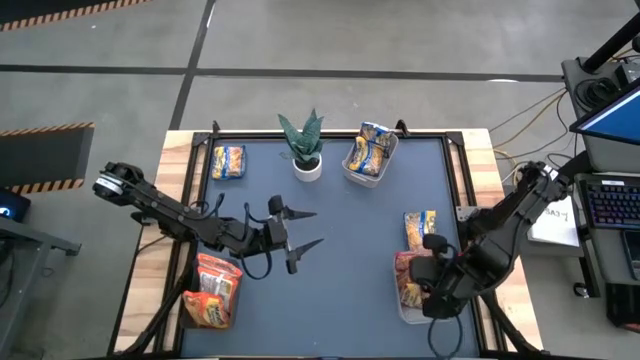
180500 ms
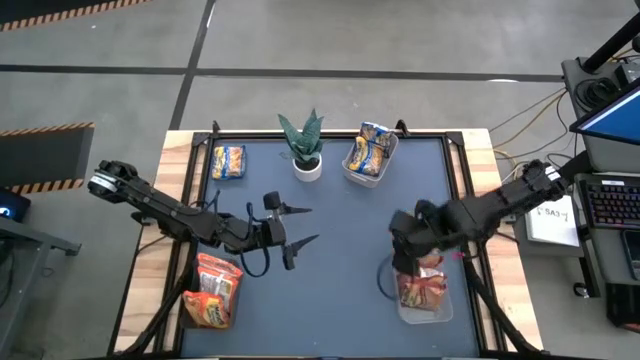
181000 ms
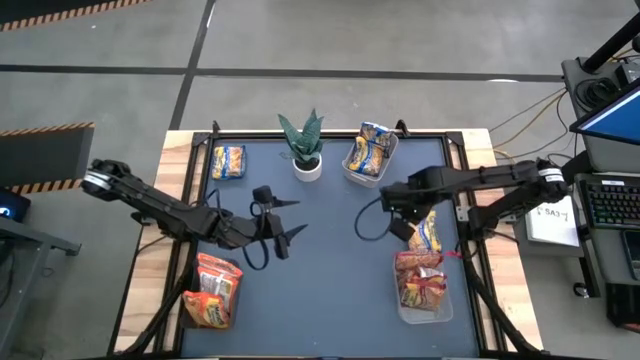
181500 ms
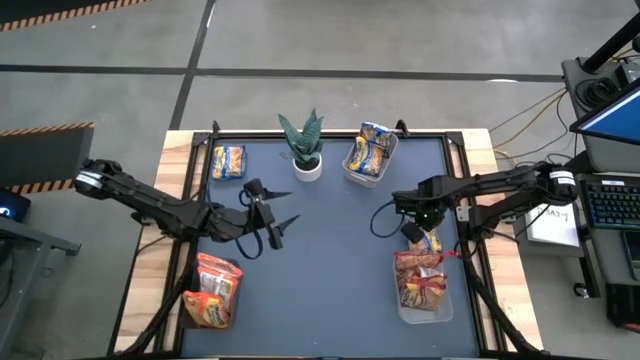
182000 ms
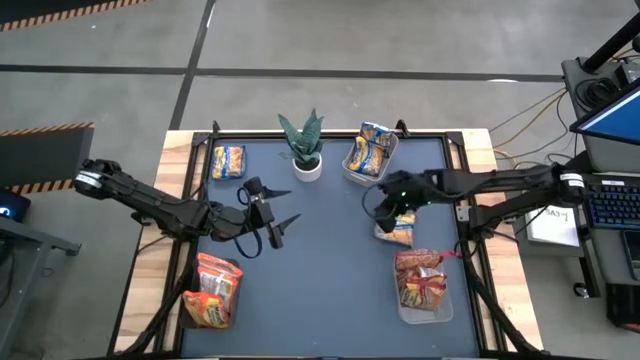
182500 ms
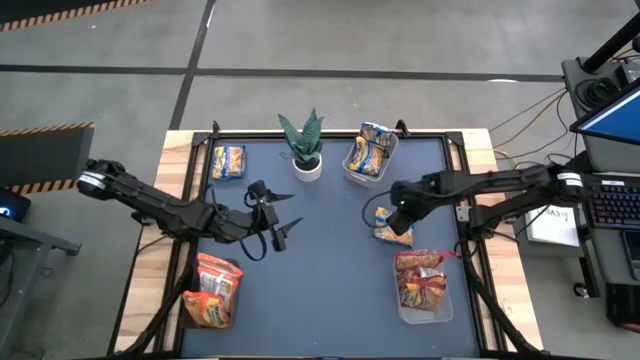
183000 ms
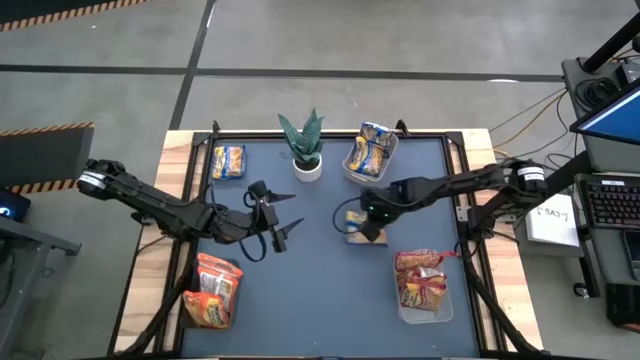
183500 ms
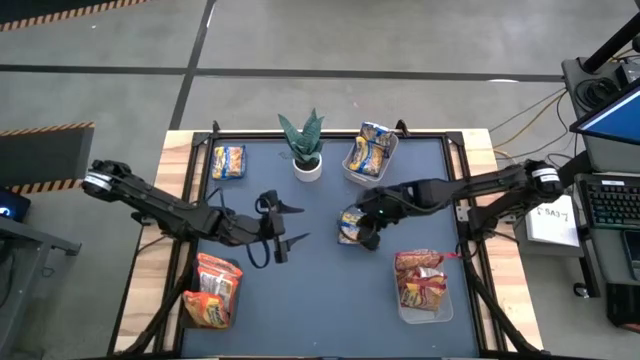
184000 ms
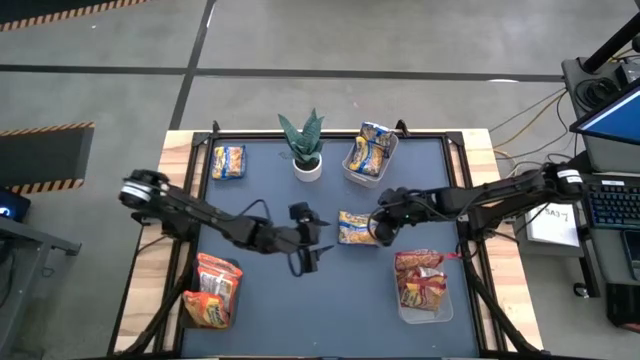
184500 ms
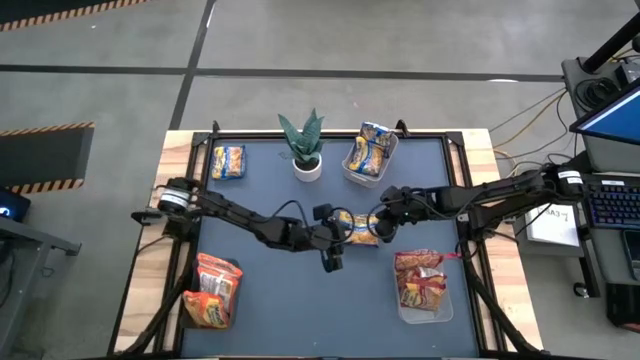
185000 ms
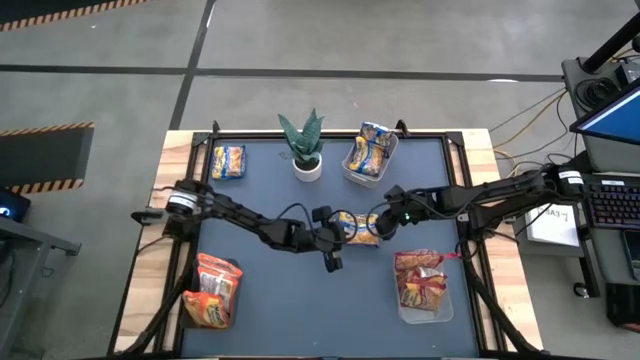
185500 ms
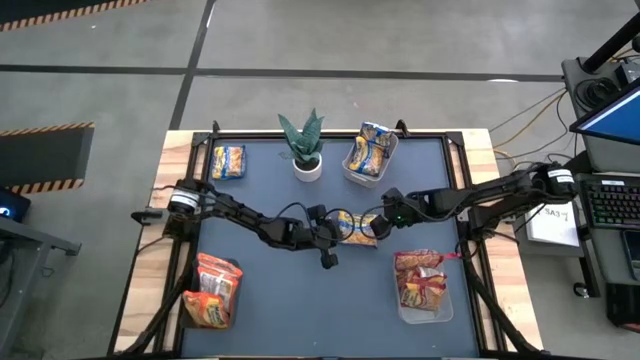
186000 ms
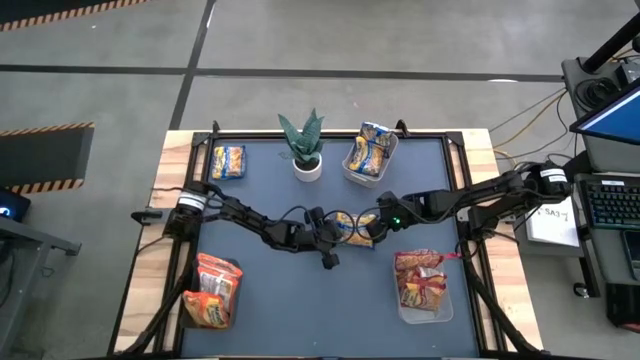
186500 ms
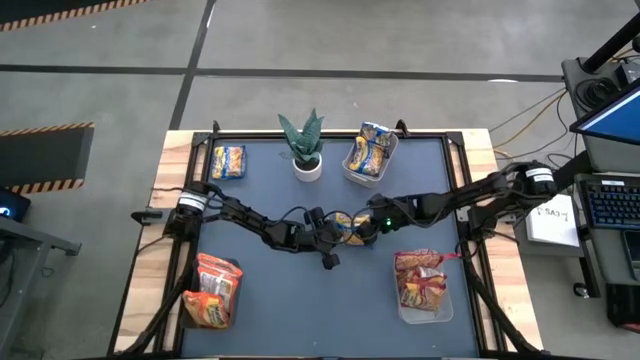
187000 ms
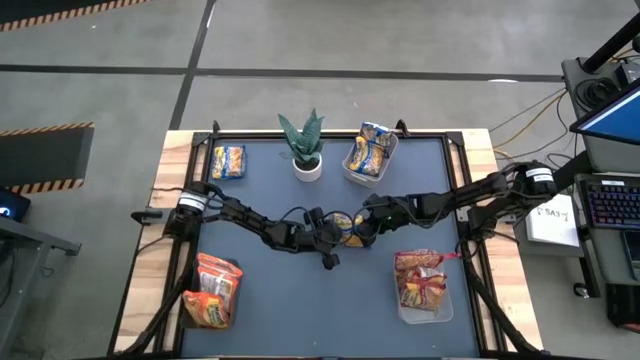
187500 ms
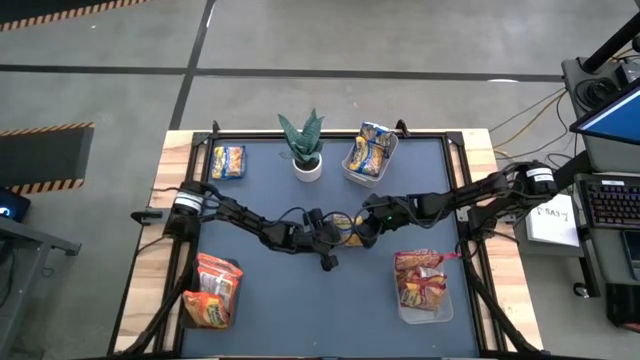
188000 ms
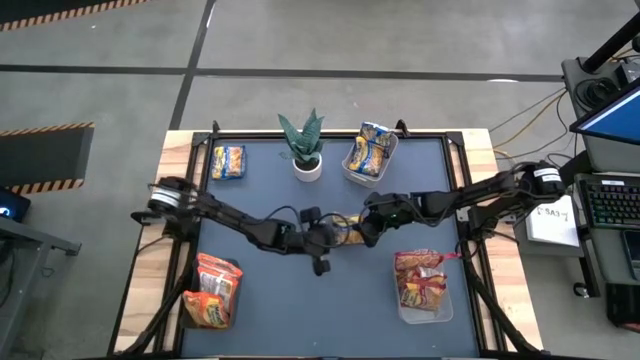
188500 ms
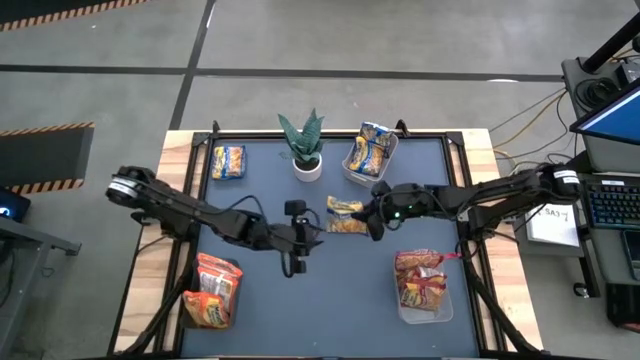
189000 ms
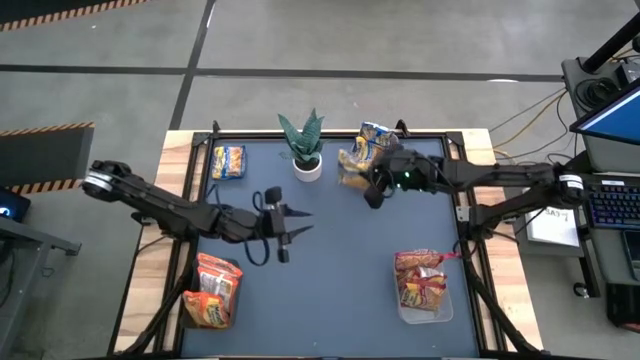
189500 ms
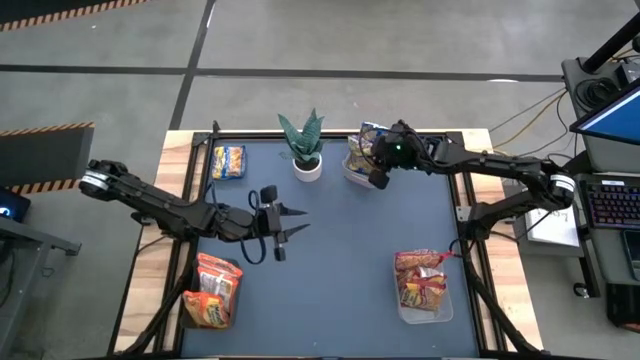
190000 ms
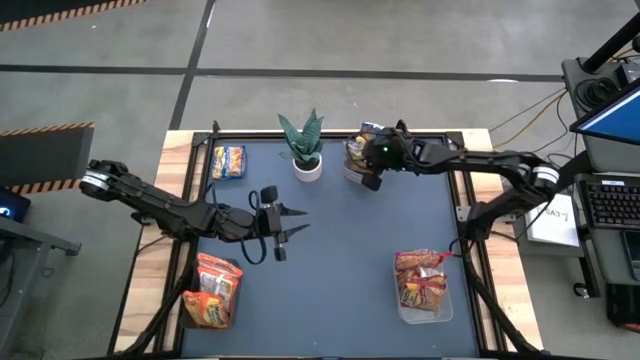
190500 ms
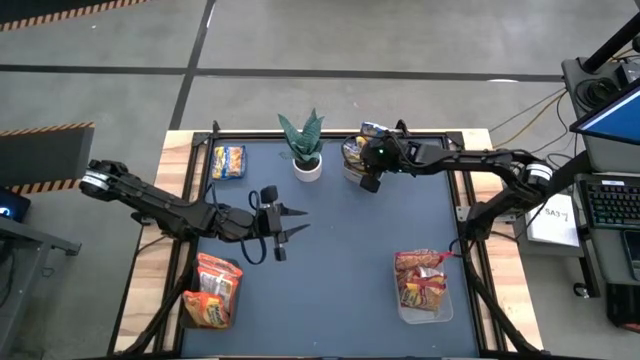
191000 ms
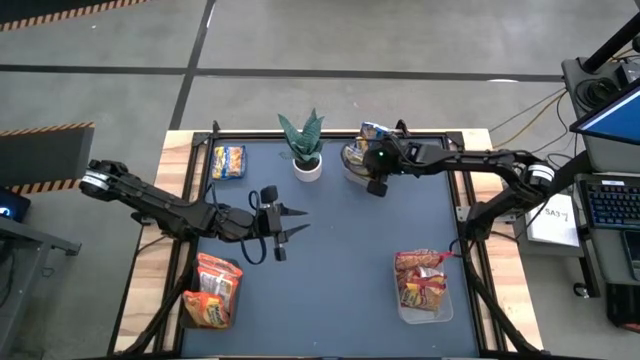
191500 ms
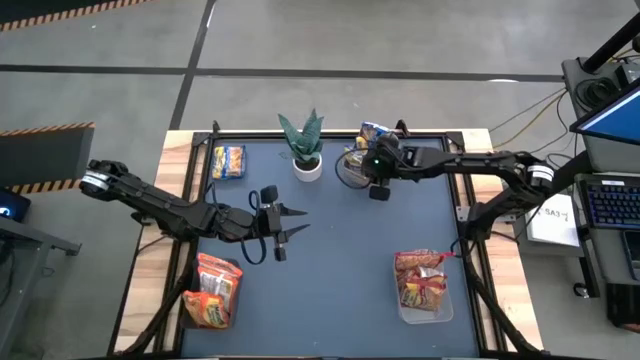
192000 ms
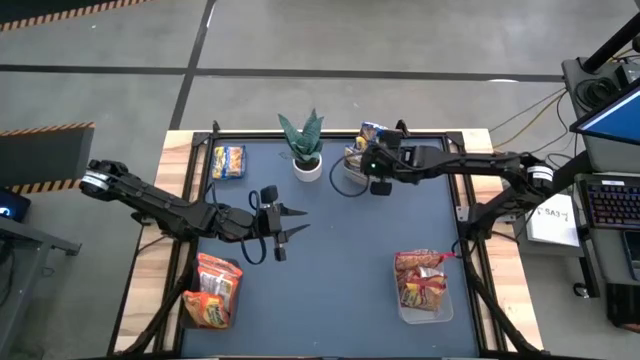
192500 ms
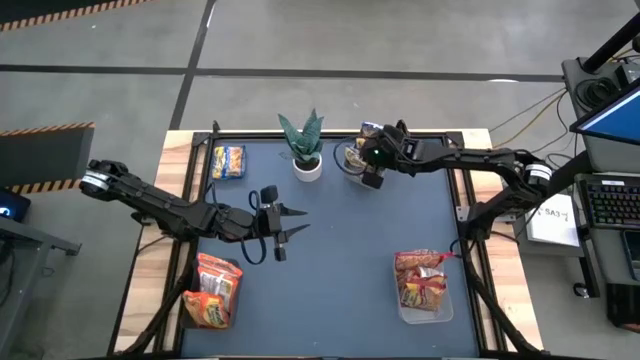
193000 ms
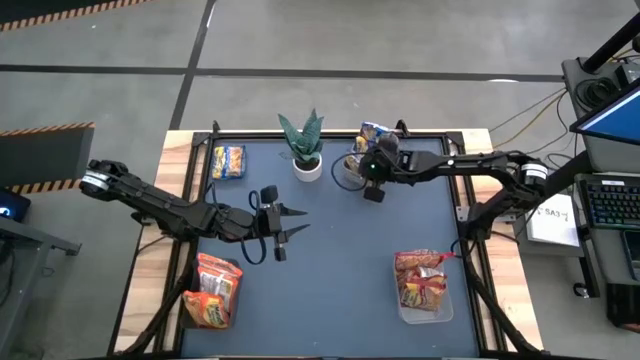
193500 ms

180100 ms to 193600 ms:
Task: Sort Maruchan noodles
Put the right blue instant noodle pack into the gray bin

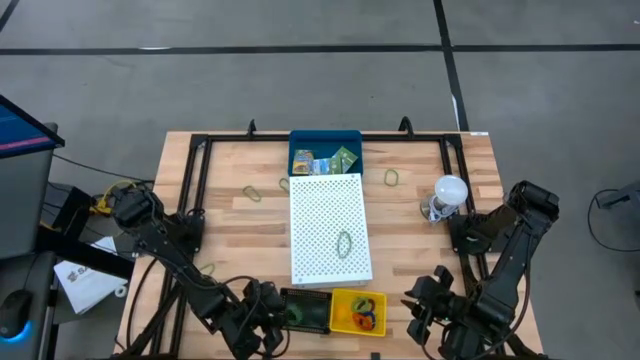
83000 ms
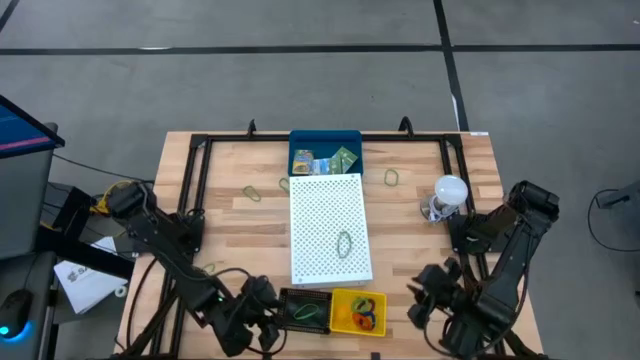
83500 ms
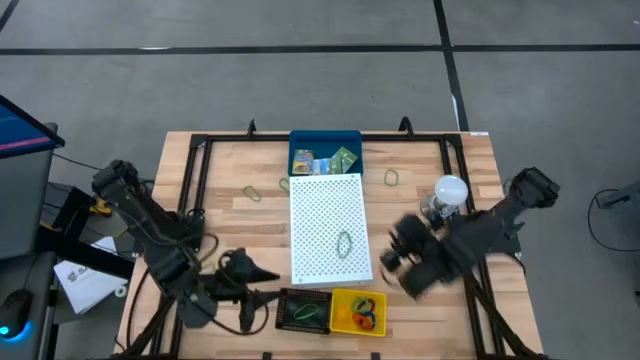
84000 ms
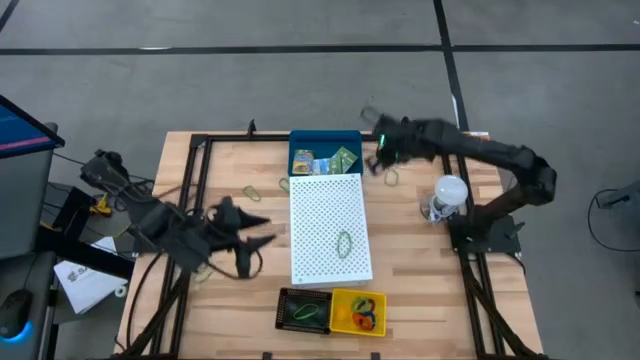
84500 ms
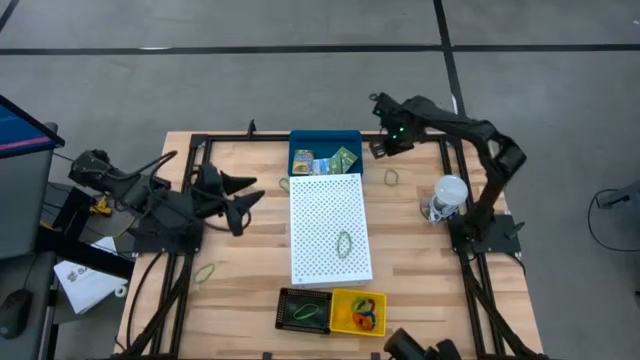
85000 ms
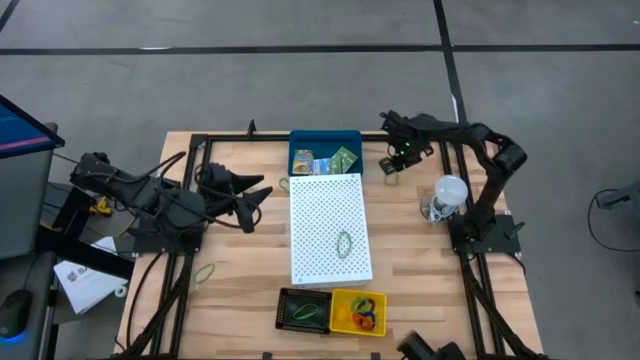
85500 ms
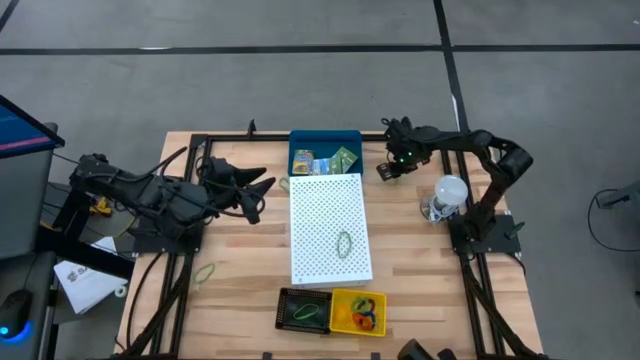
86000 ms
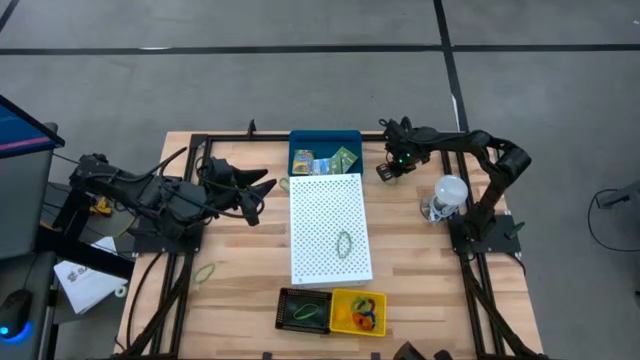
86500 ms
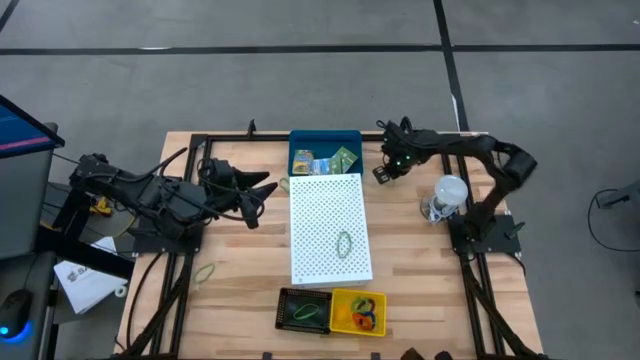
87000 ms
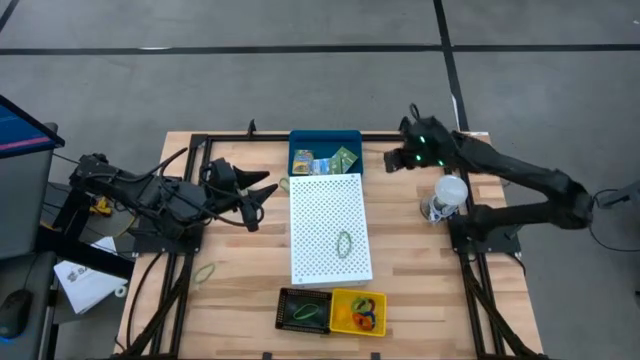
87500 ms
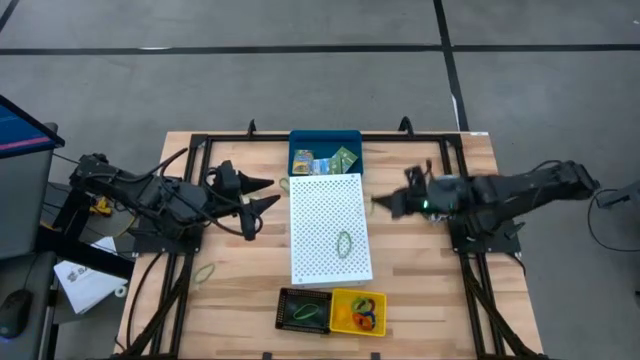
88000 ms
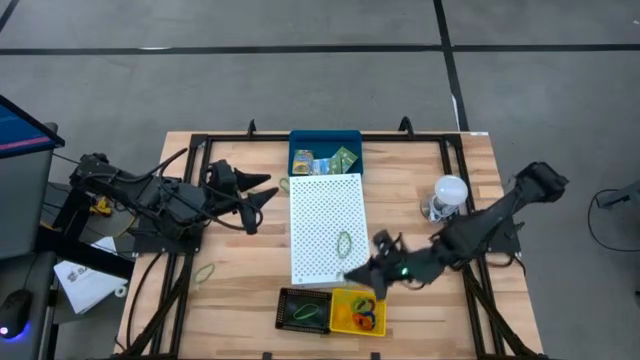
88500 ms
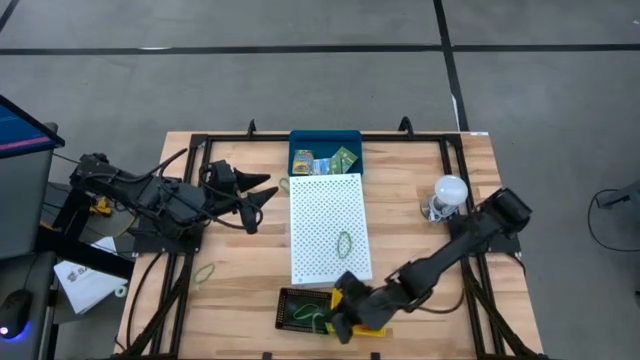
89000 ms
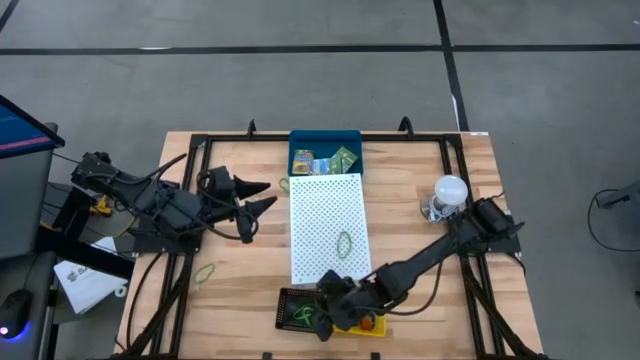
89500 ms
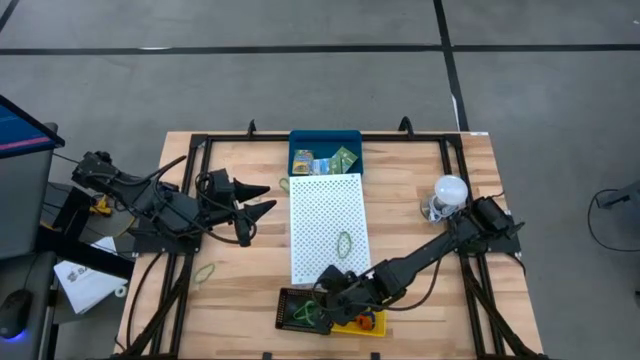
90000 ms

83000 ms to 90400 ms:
Task: Pick & Place Office Desk Supplies
Put the green rubber band into the black bin
